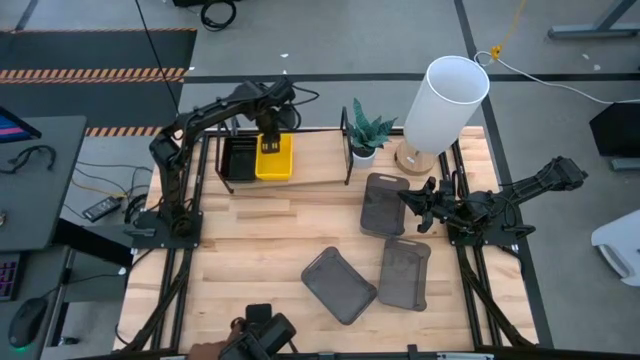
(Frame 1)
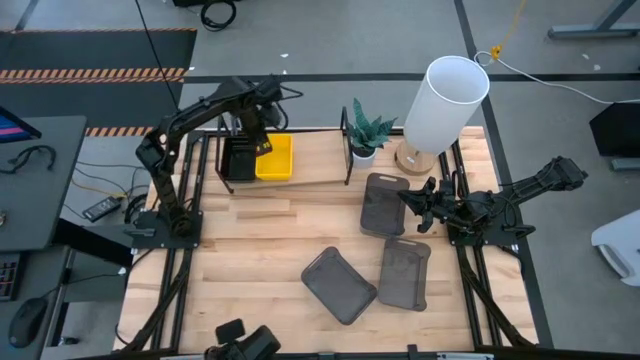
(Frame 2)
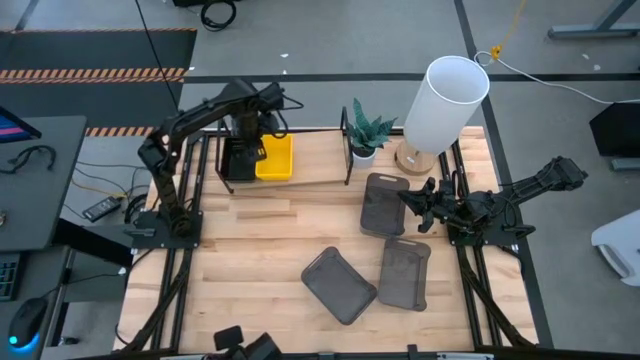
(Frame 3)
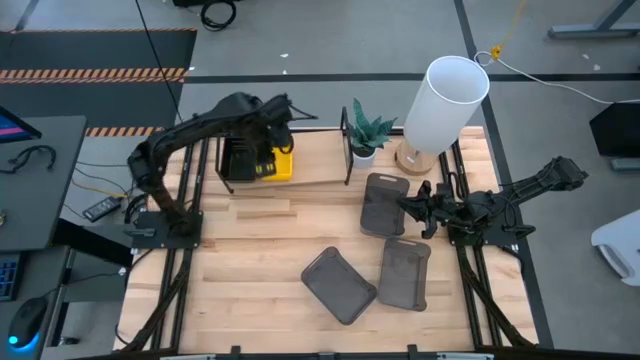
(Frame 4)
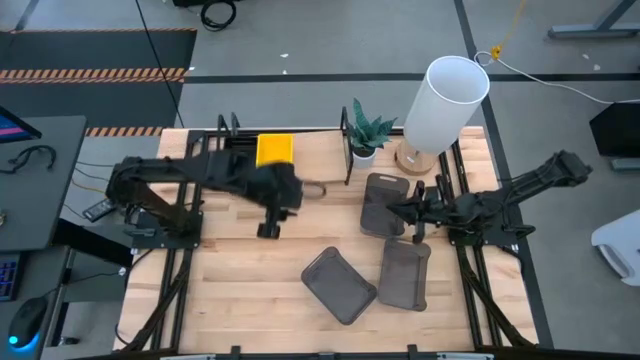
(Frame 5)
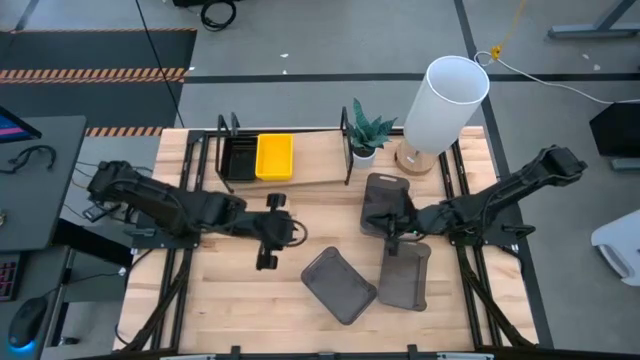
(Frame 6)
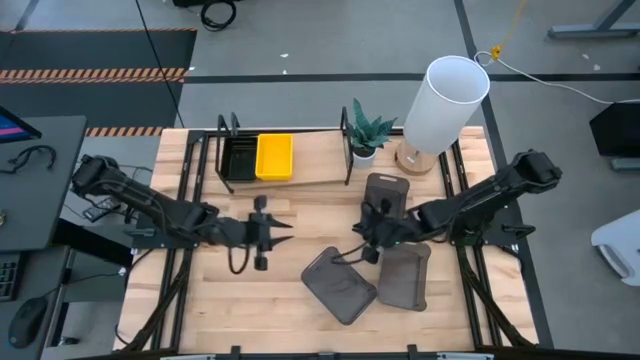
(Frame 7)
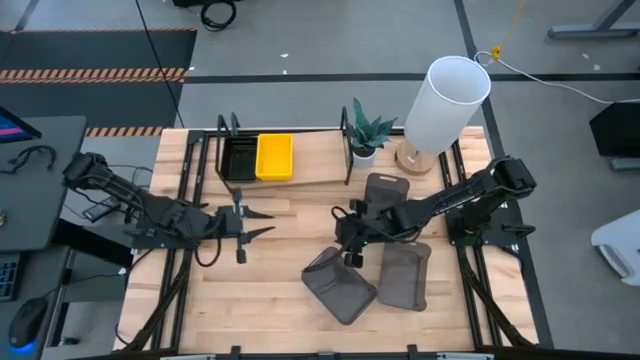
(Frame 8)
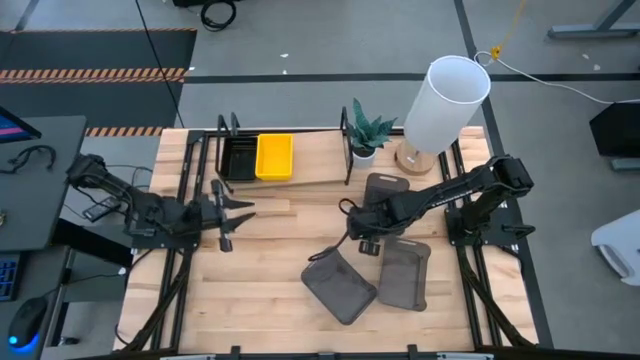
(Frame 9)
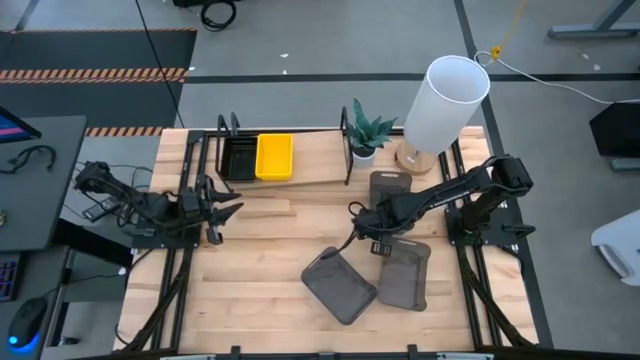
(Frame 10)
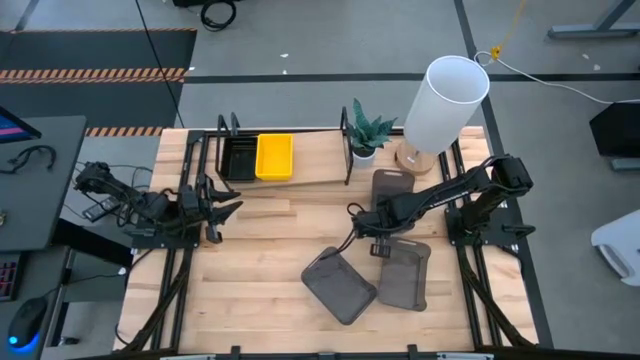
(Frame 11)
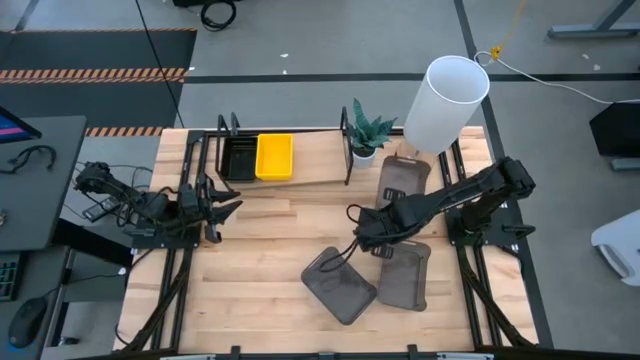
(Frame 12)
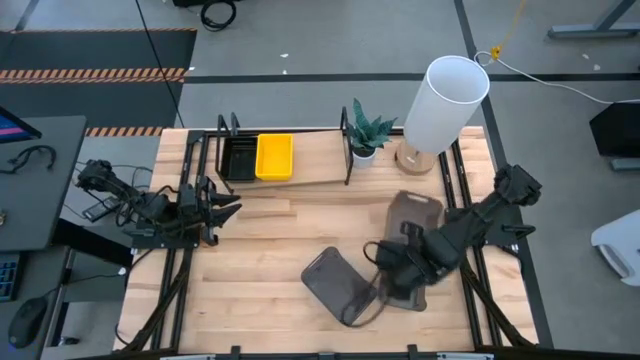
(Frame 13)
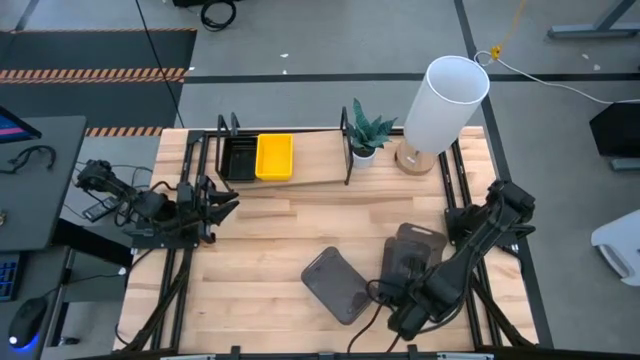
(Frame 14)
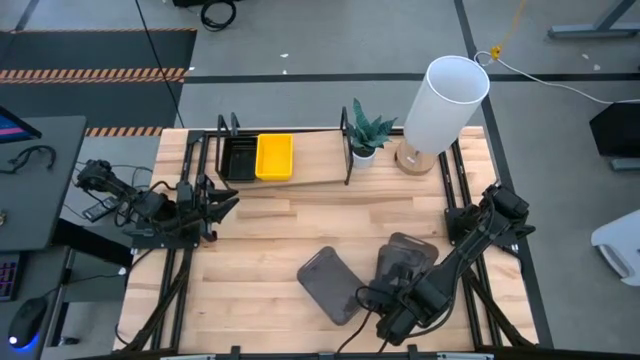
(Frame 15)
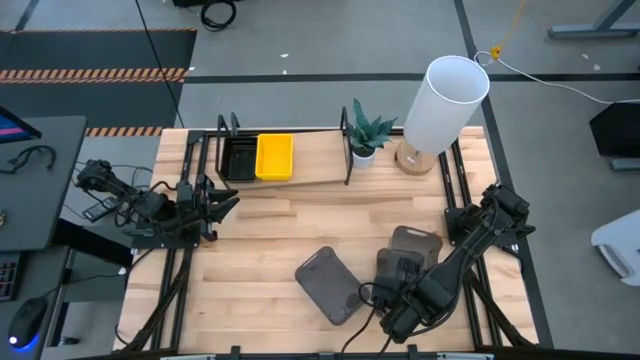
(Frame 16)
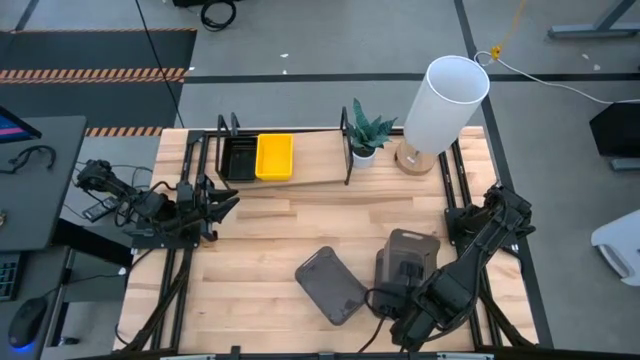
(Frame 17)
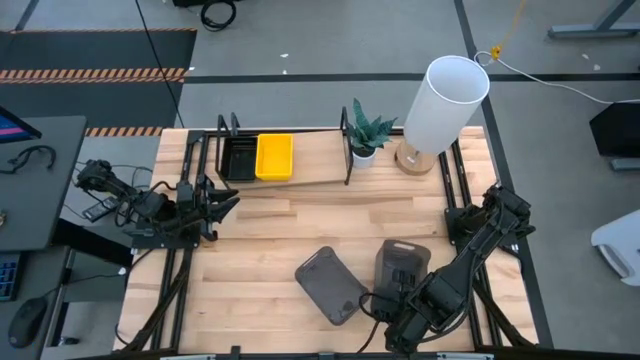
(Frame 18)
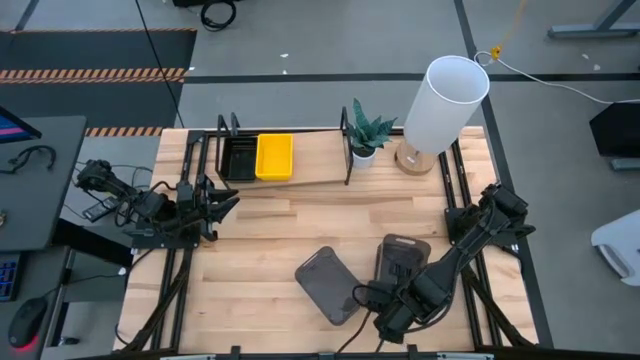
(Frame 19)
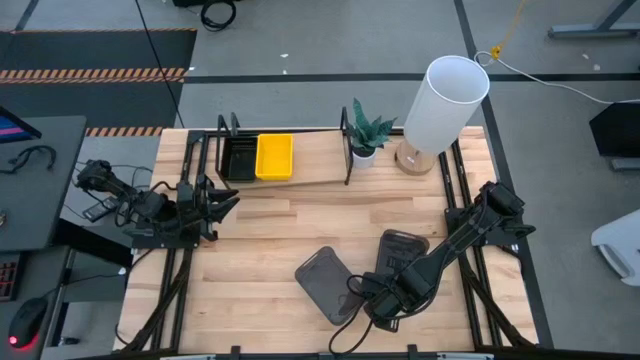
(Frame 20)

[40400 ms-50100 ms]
Task: Stack baskets on shelf by color
Stack the top black bin on top of the bottom right black bin

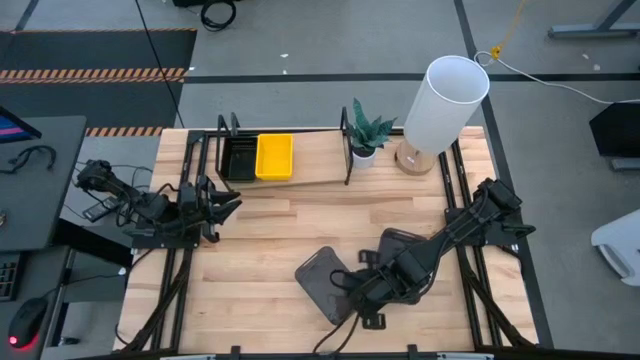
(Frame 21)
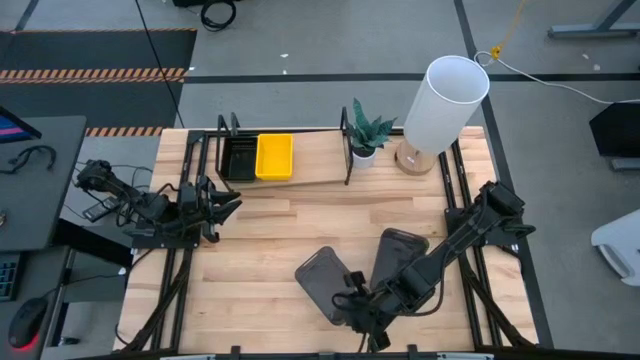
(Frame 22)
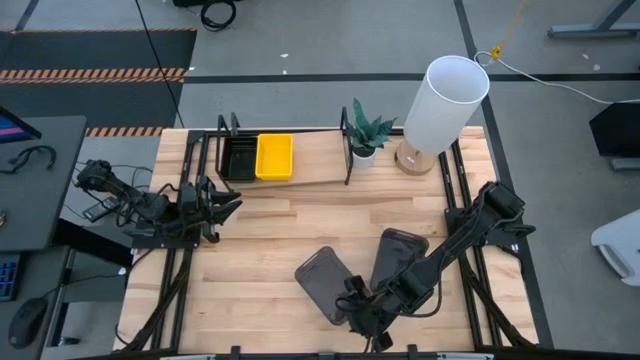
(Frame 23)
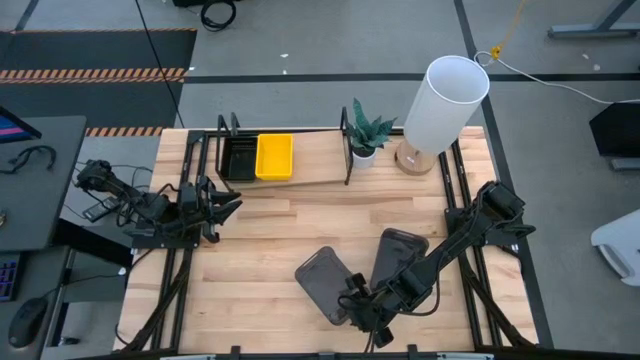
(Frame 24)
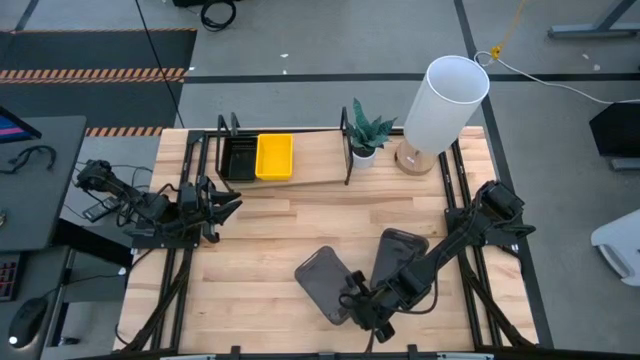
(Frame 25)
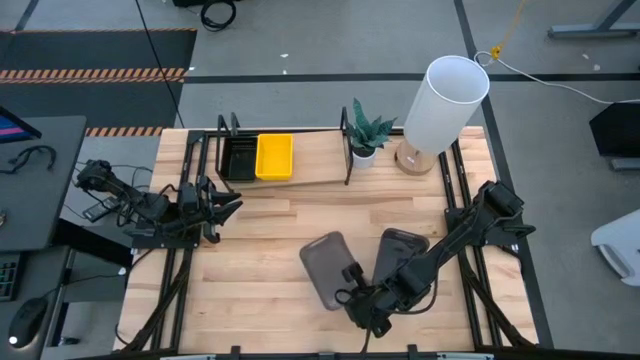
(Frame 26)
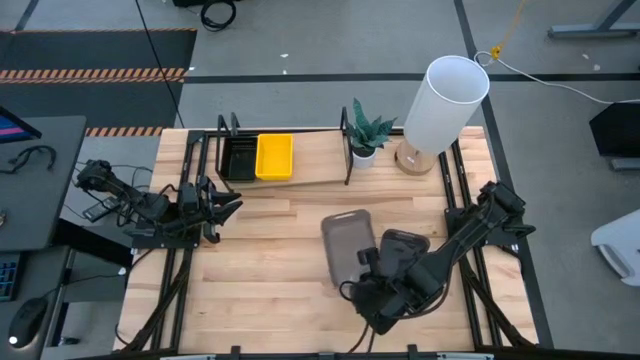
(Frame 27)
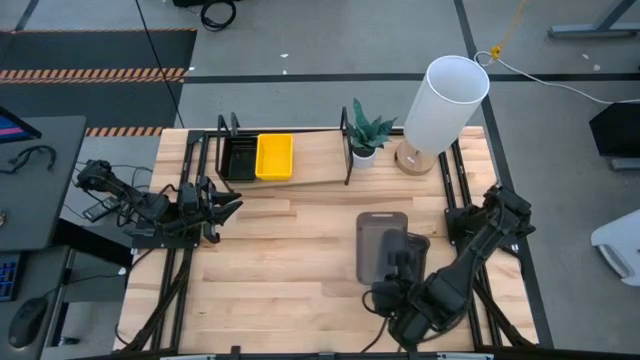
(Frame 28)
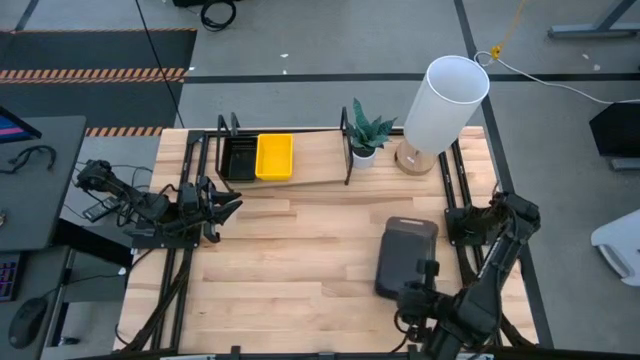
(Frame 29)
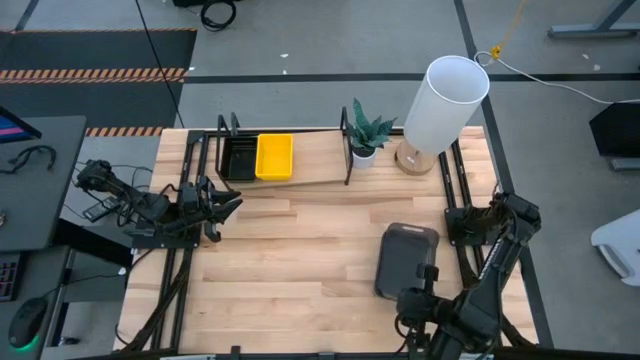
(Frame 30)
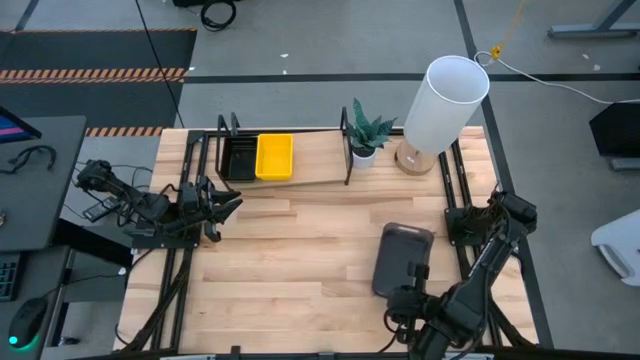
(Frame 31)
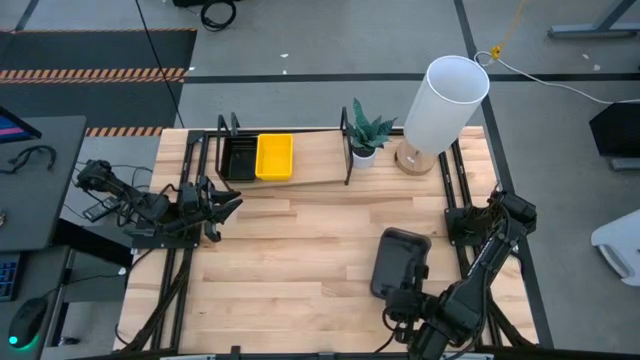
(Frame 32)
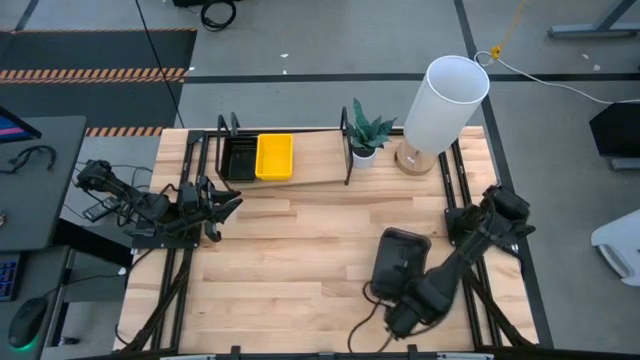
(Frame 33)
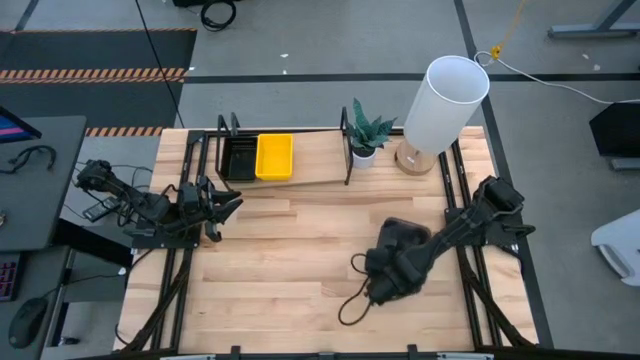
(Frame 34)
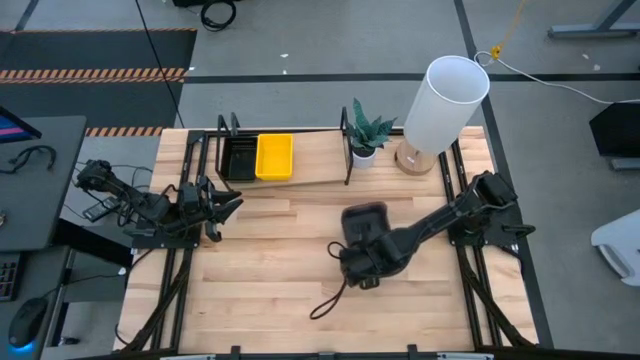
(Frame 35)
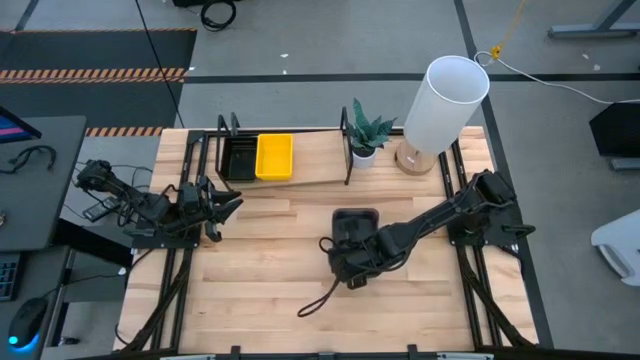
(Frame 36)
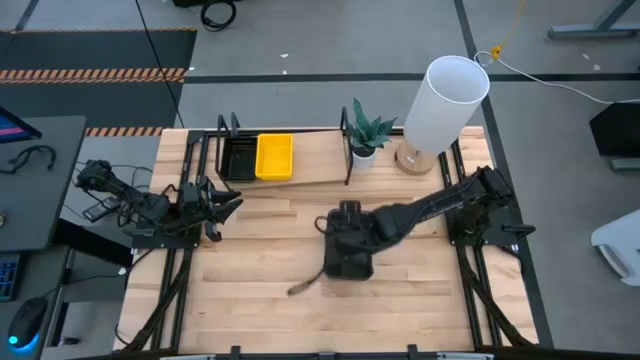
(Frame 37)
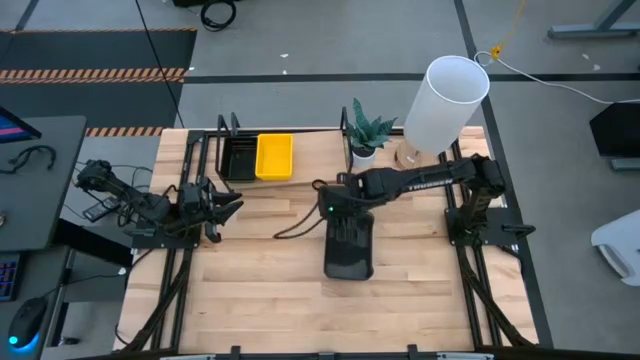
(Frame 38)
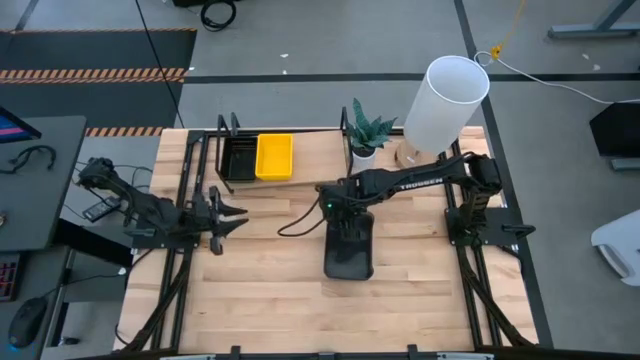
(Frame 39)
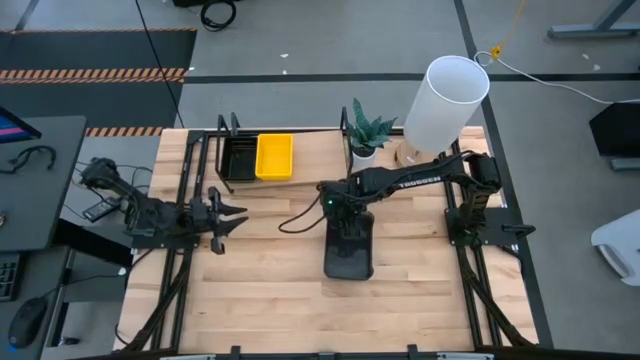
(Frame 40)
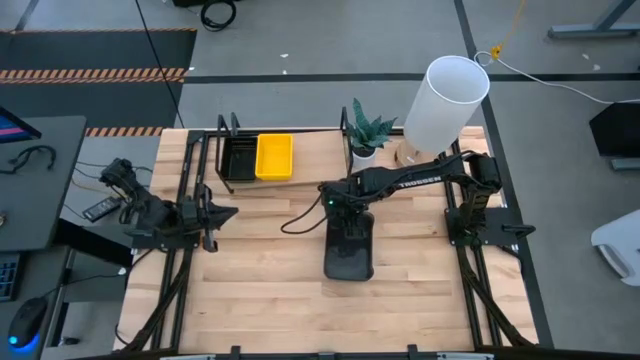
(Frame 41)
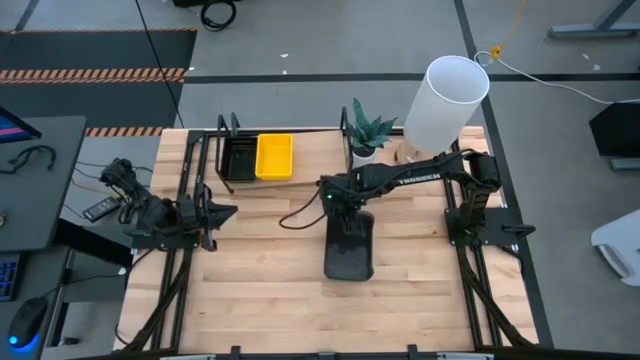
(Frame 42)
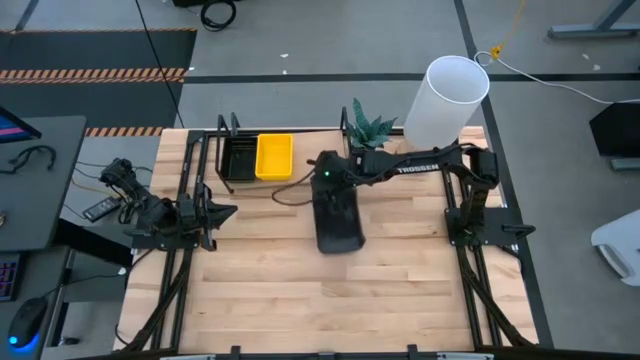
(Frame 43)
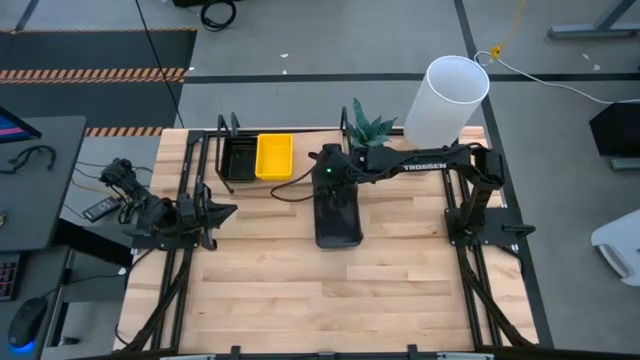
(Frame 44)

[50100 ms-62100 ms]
Stack the left black bin on top of the right black bin

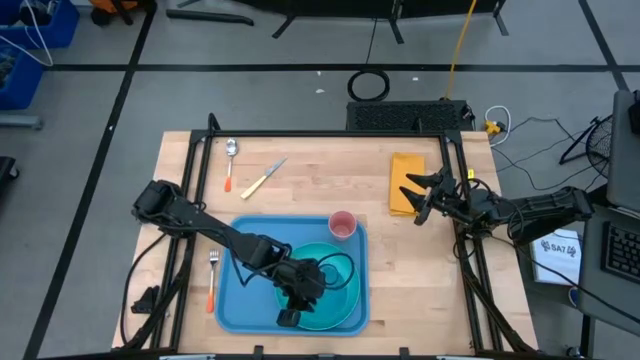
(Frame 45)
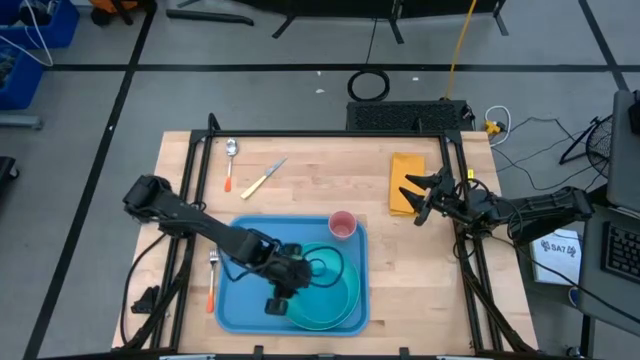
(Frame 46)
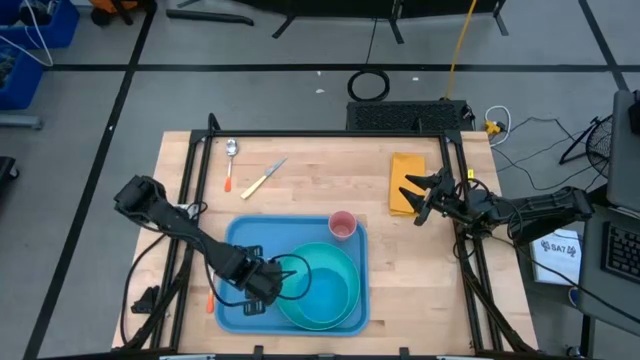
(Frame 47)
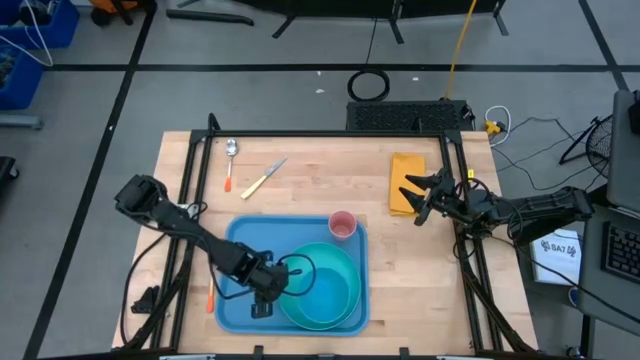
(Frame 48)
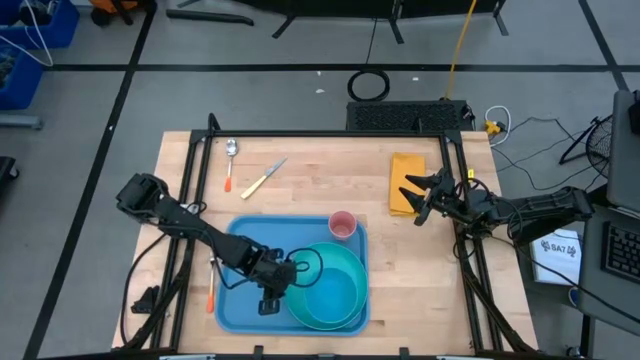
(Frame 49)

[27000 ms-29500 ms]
Task: Set up tray
Adjust the light green plate on the blue serving tray
